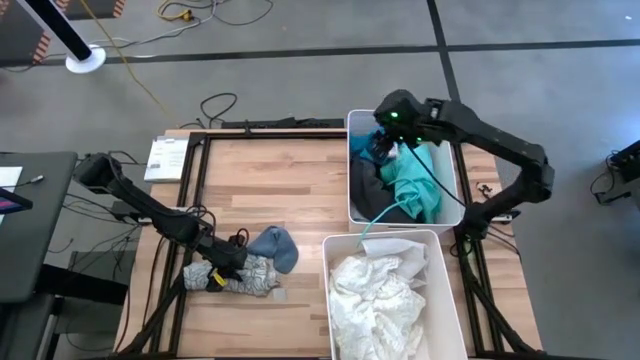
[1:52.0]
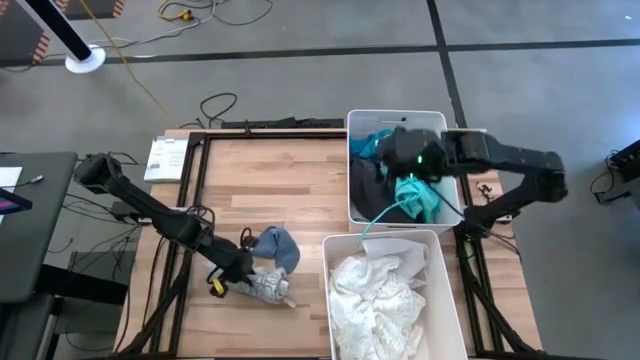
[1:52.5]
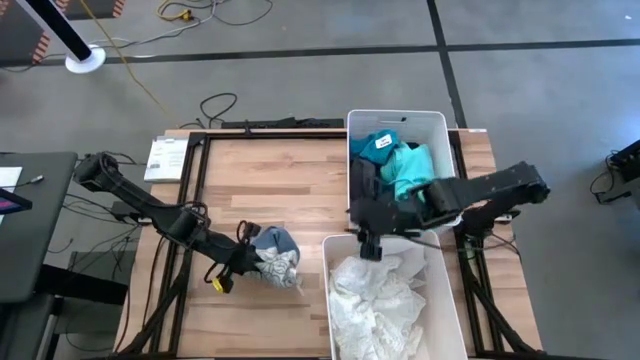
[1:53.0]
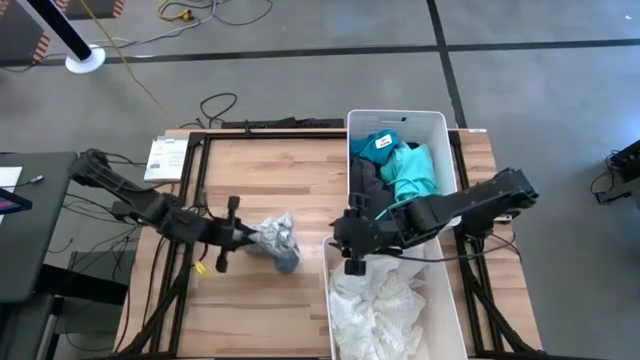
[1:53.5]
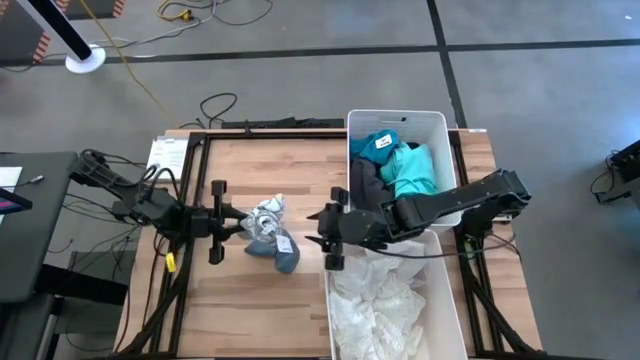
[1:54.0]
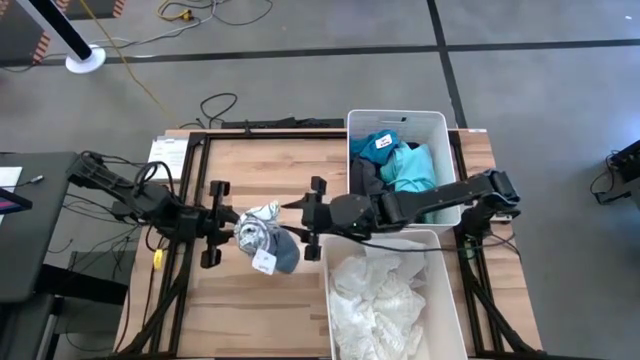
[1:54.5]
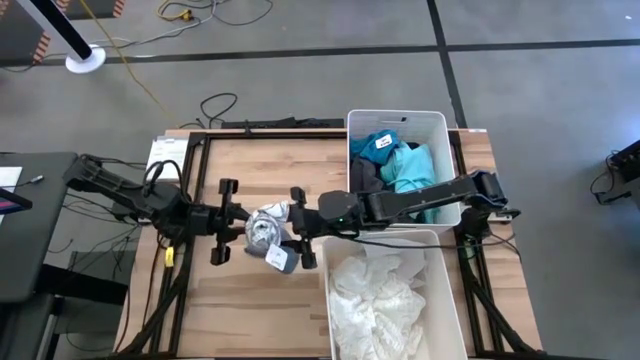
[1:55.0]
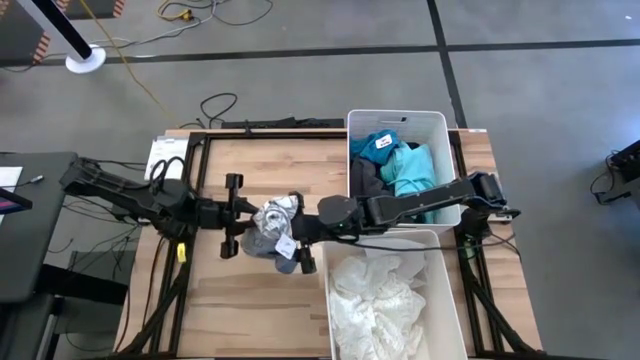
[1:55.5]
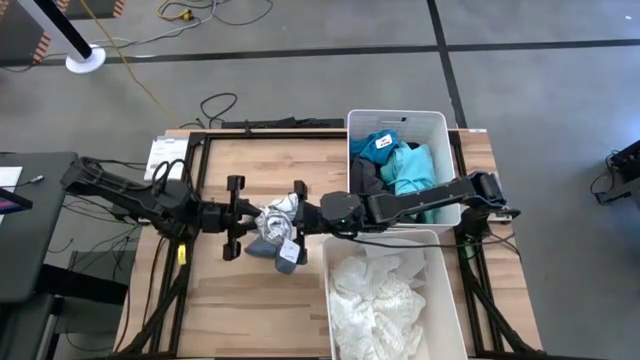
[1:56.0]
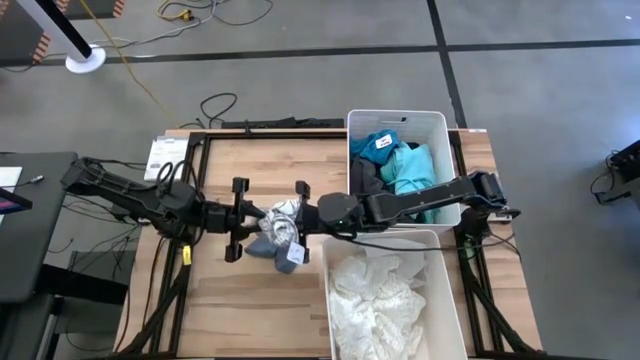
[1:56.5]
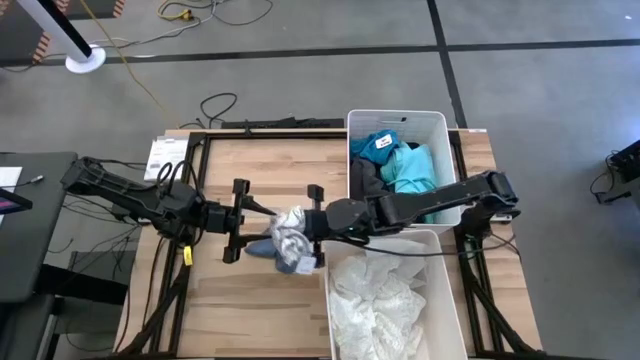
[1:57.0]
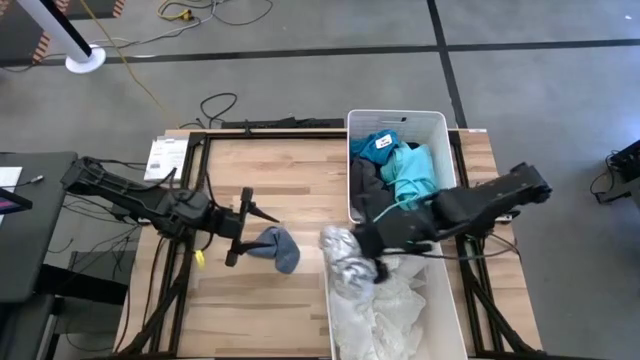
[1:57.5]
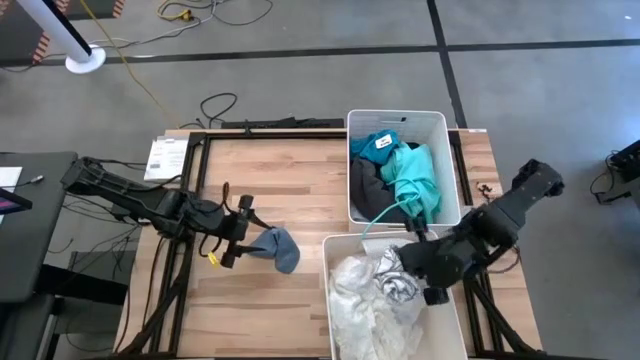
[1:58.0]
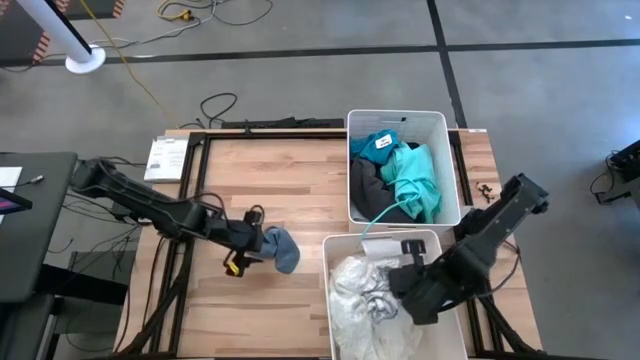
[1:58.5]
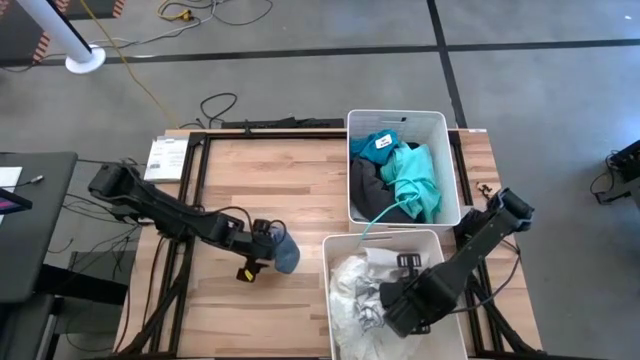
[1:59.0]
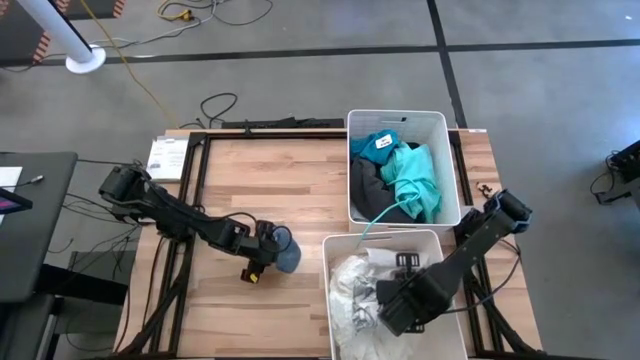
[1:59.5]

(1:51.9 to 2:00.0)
Task: Sort clothes
Put the white and black shirts into the bottom white laundry bin

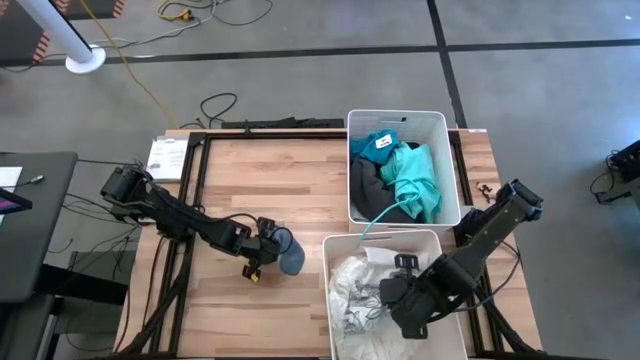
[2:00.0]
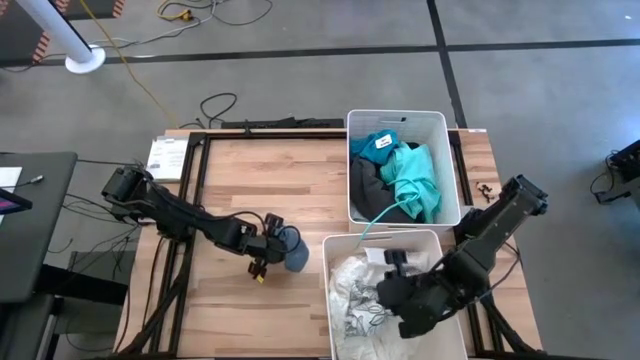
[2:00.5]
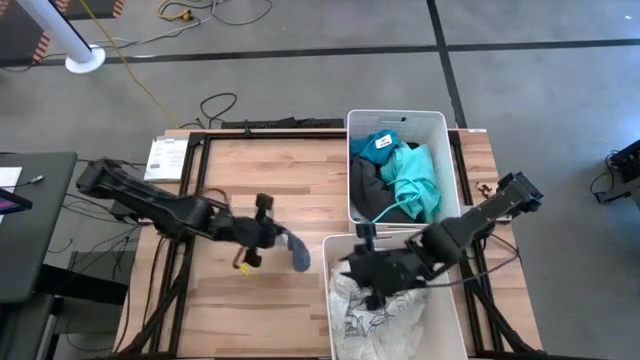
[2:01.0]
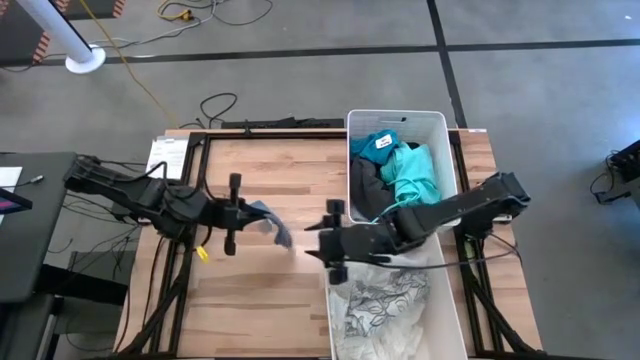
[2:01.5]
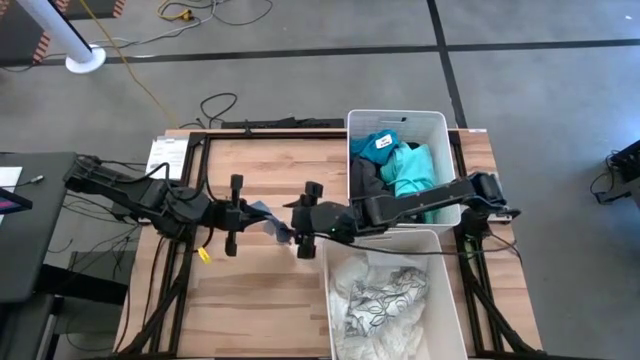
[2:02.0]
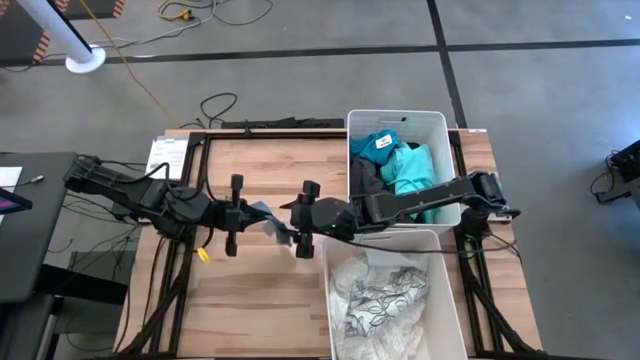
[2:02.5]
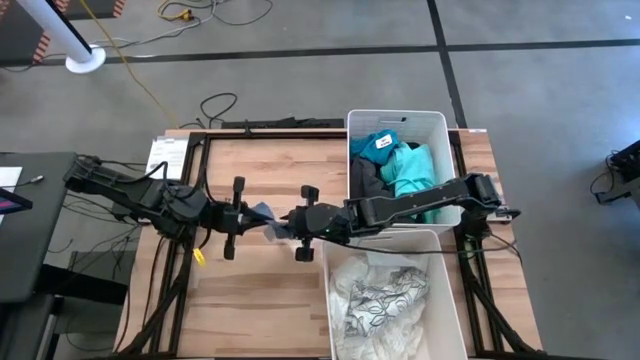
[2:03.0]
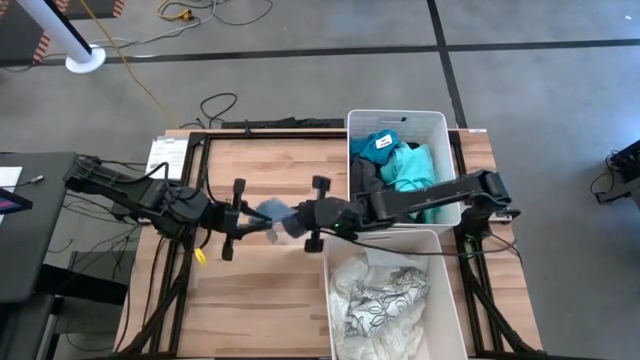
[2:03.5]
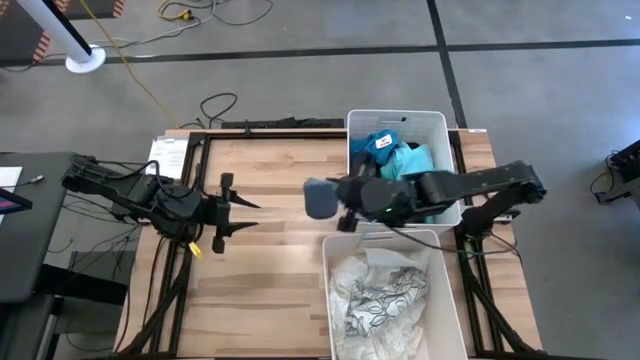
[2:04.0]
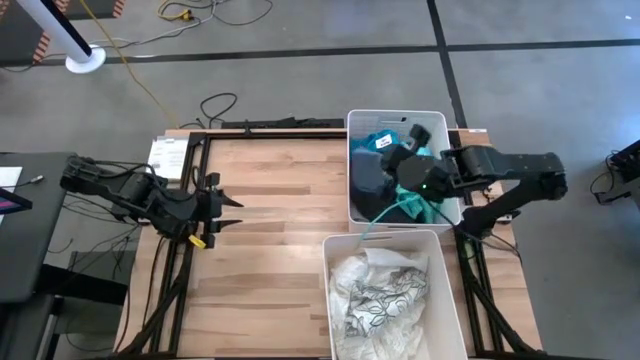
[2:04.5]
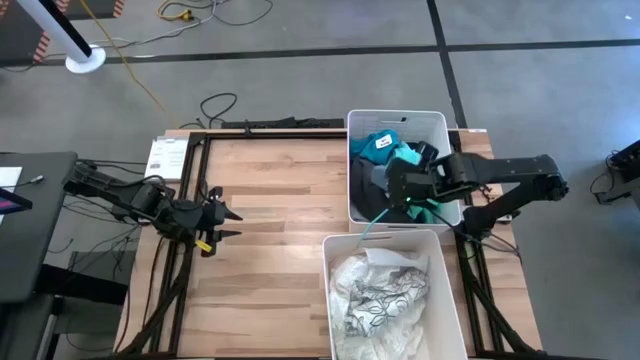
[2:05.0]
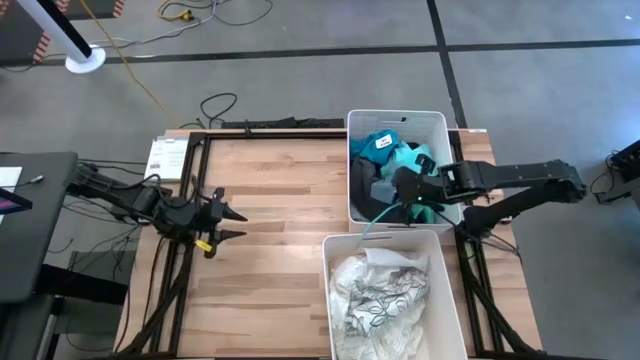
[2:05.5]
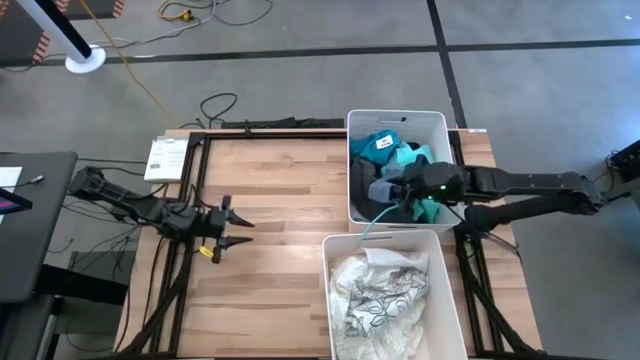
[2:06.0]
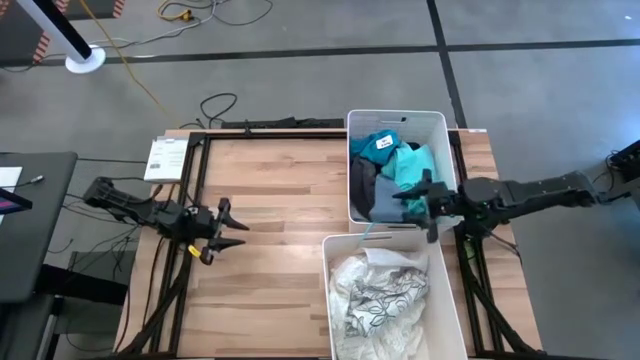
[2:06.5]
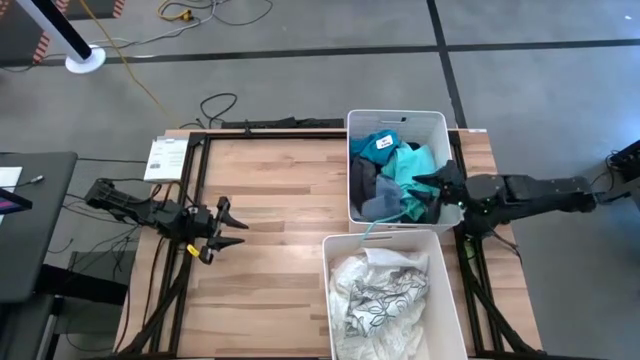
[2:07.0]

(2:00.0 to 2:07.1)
Put the blue sock into the top white laundry bin

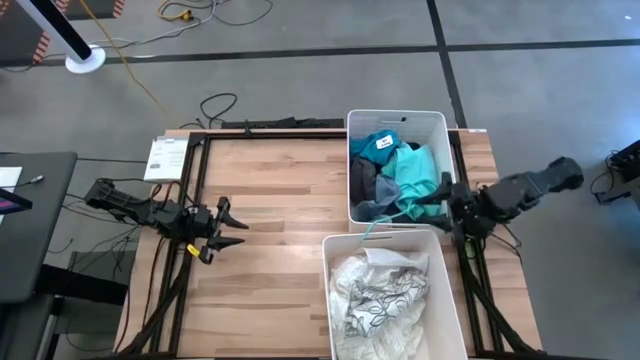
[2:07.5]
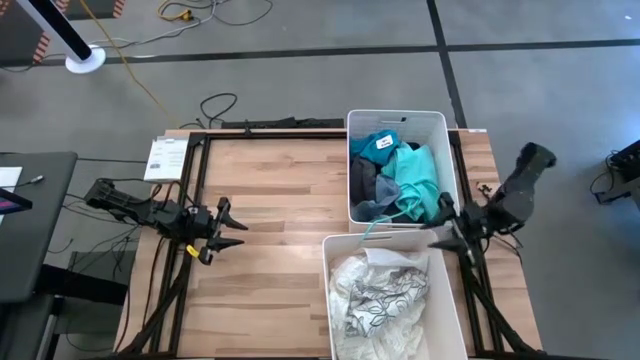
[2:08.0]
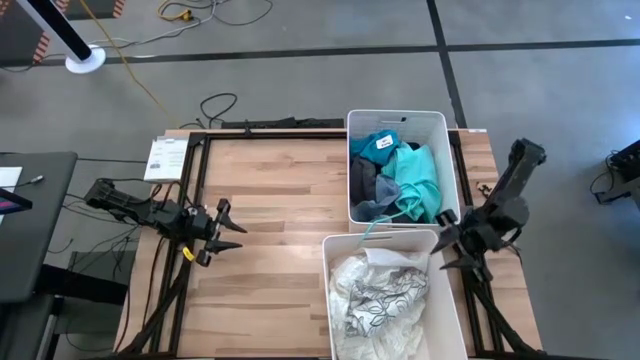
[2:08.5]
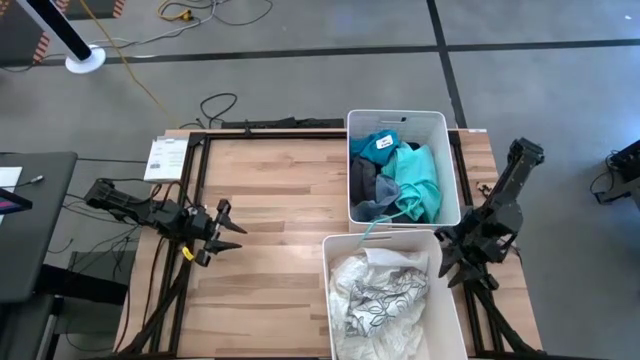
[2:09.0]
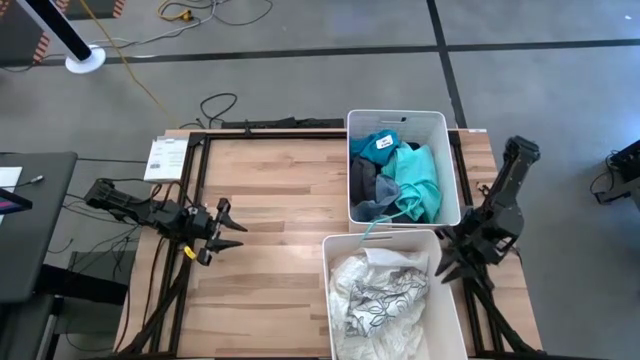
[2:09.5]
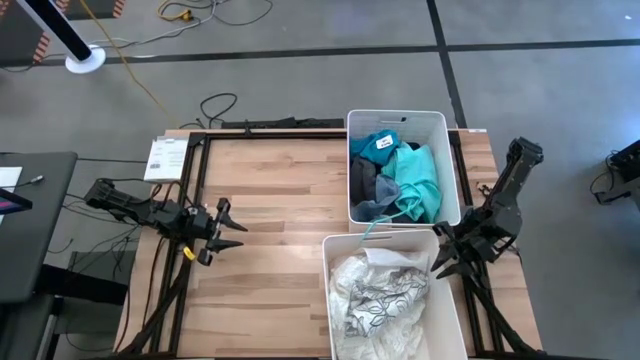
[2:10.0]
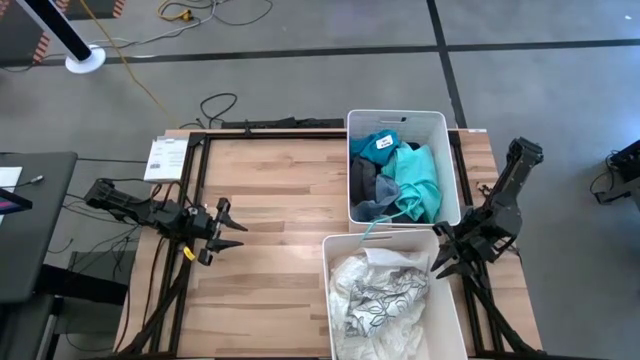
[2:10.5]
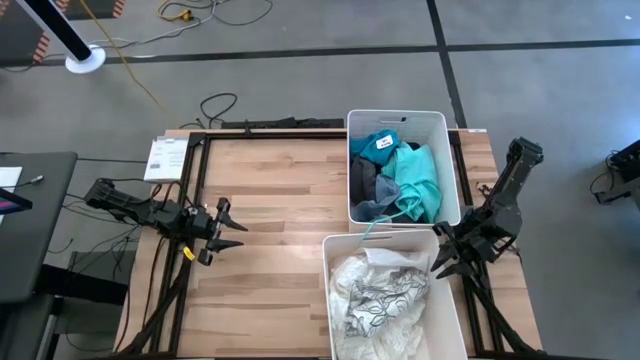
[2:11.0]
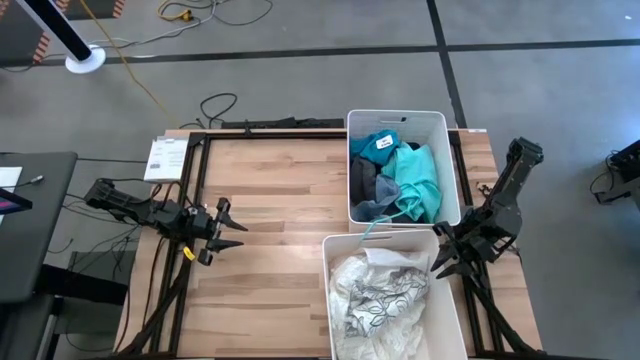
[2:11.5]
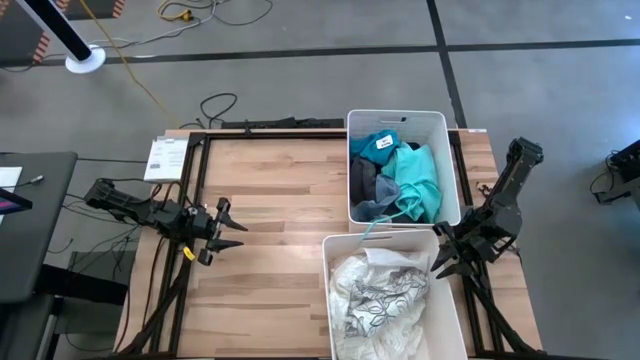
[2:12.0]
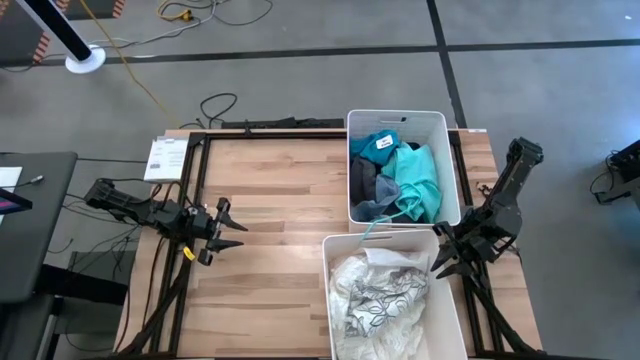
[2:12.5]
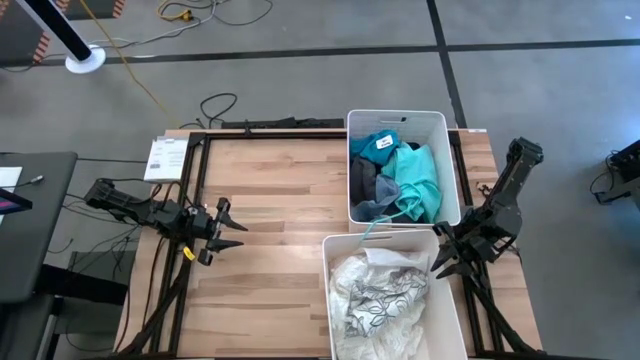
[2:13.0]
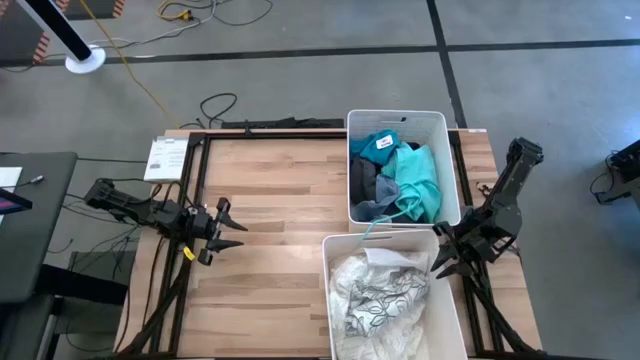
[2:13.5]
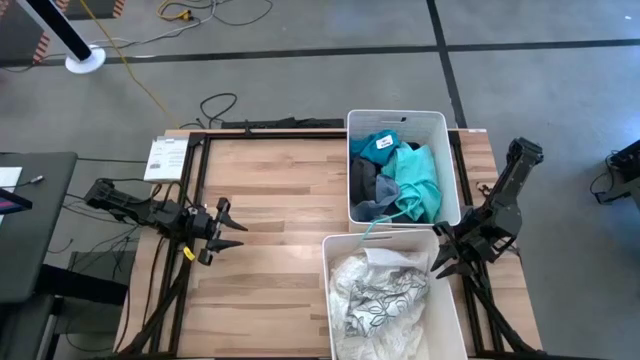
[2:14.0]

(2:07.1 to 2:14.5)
Return to Home Position
